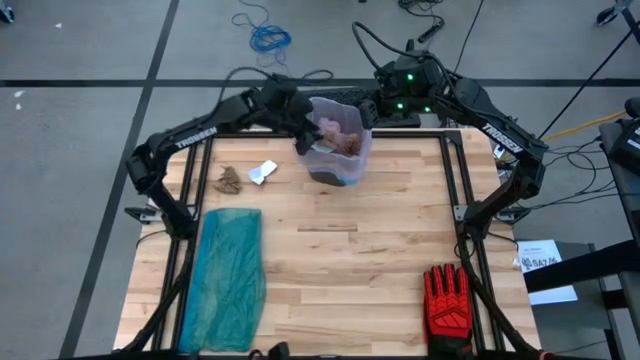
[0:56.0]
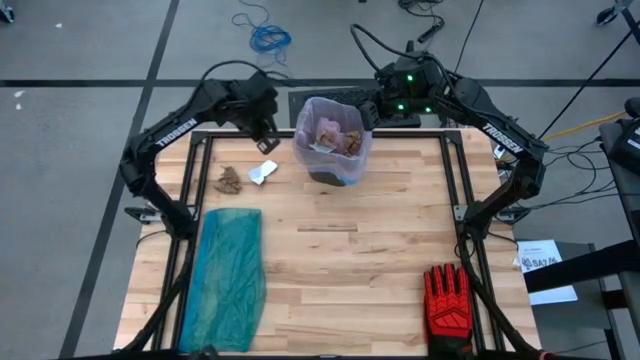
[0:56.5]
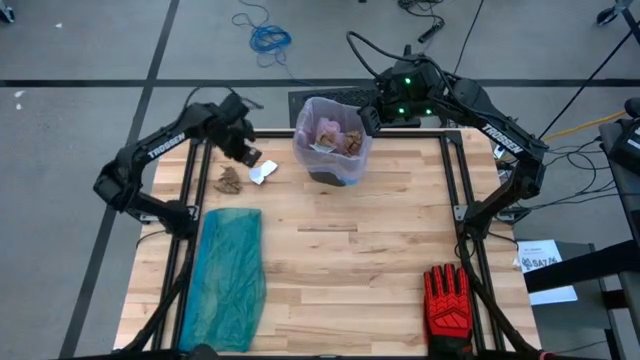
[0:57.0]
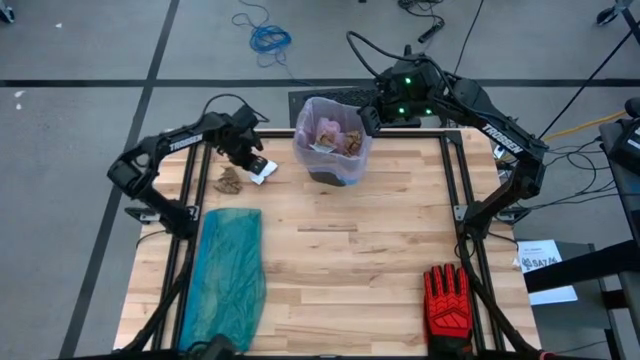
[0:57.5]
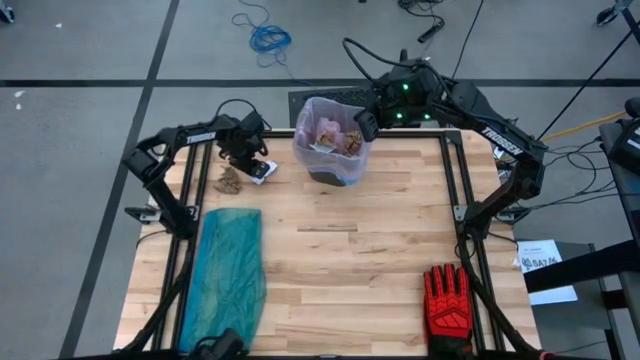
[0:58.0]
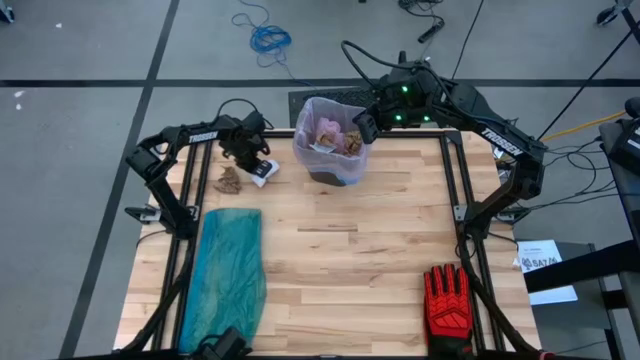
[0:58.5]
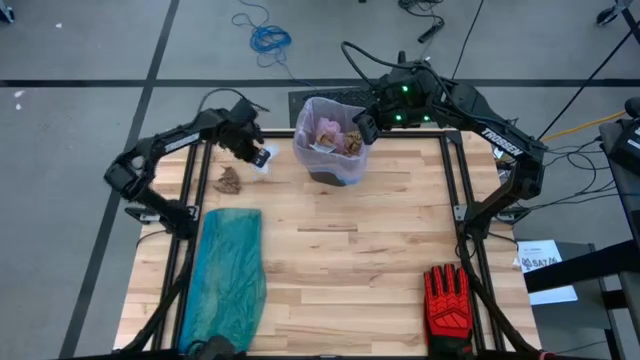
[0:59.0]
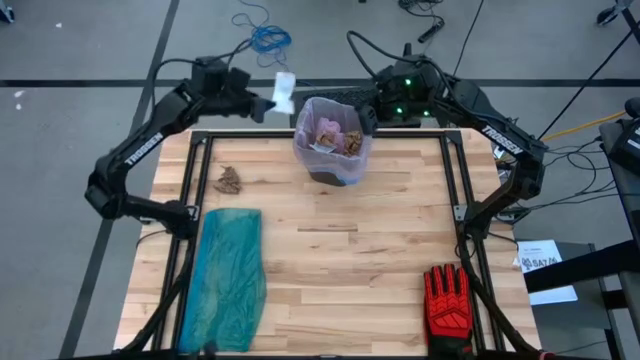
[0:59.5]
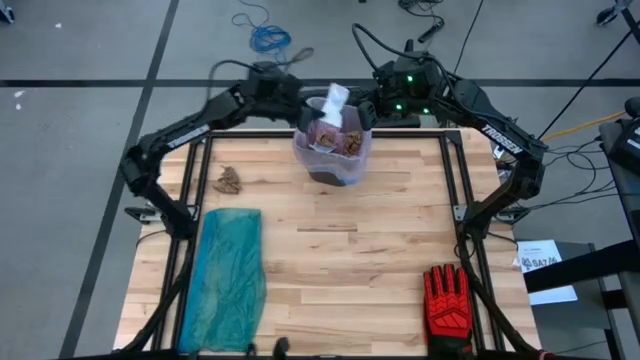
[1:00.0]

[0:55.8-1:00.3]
Task: place trash/remove bag and relplace
Put the white paper into the trash bin

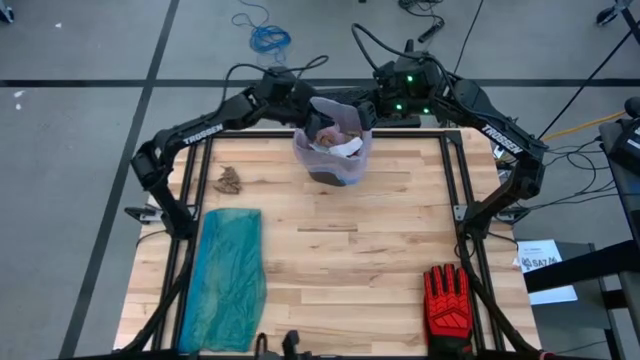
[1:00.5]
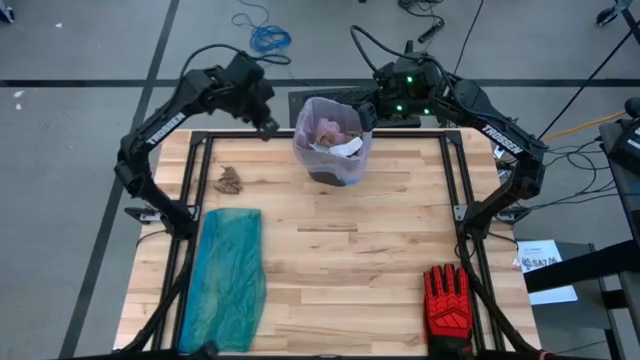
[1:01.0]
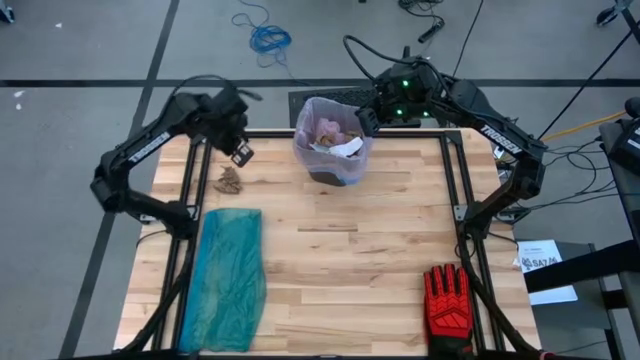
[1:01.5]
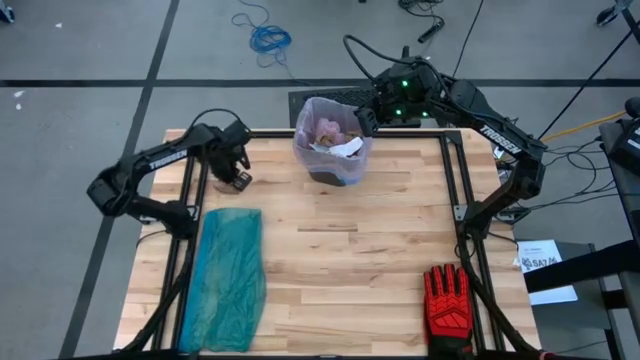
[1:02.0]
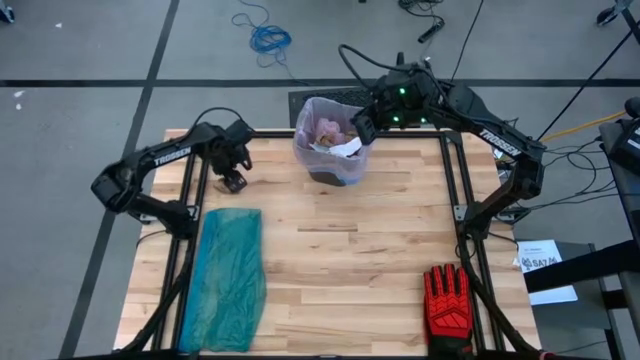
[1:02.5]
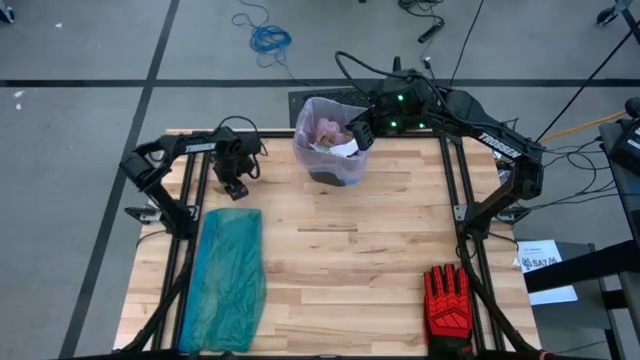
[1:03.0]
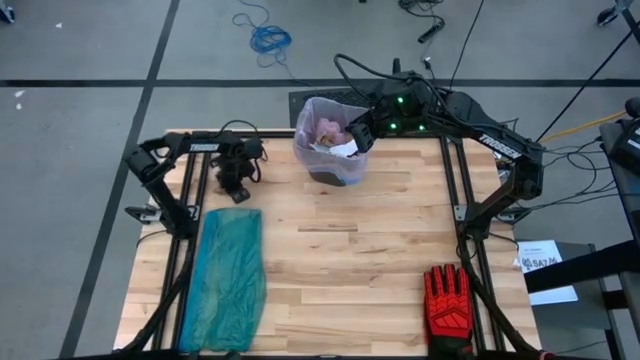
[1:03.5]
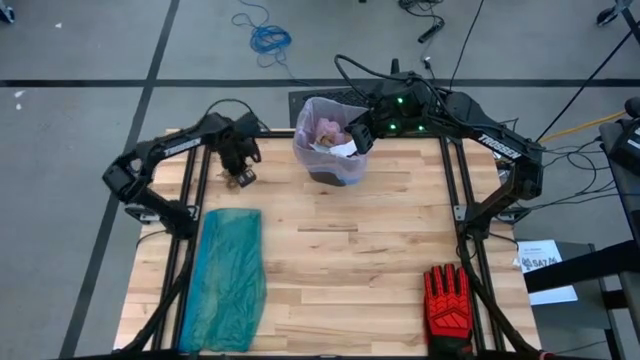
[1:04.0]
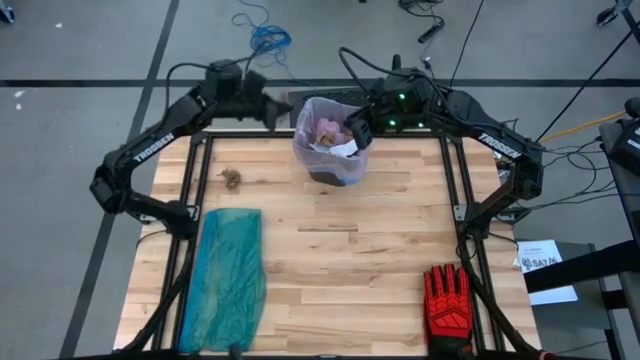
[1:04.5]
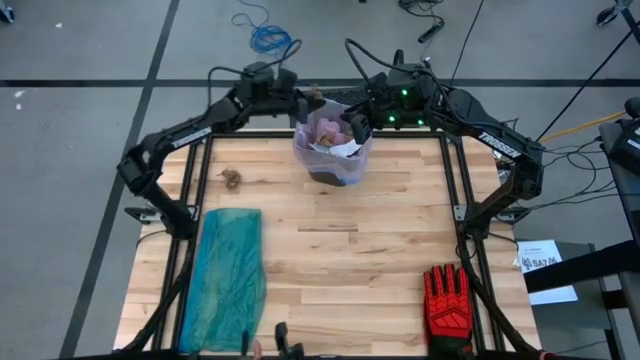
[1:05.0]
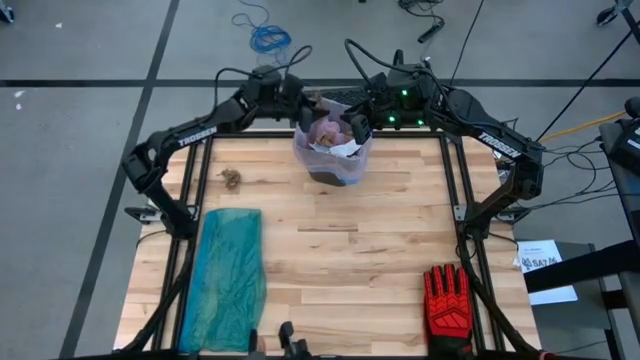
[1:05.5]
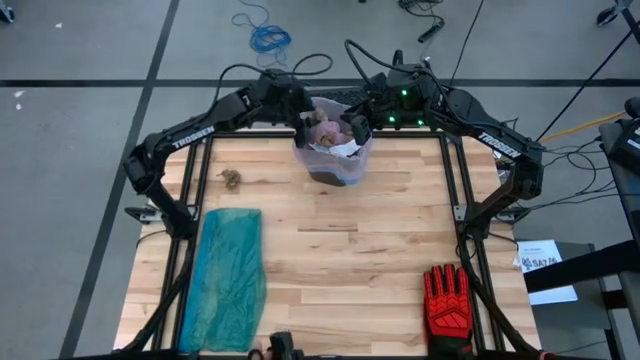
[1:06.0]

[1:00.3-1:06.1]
Put the brown napkin into the trash bin

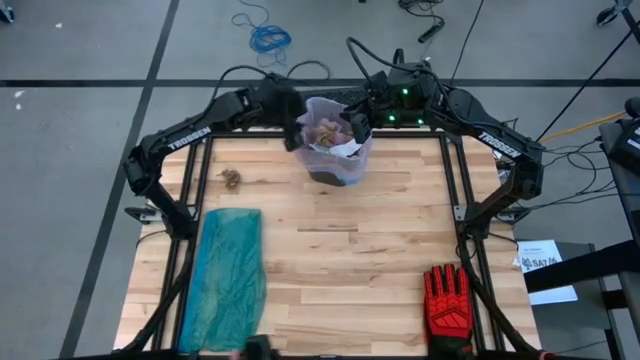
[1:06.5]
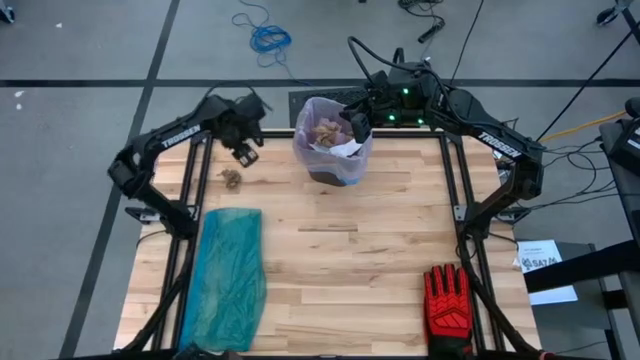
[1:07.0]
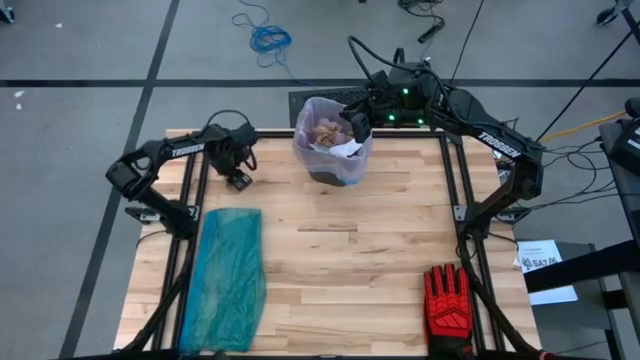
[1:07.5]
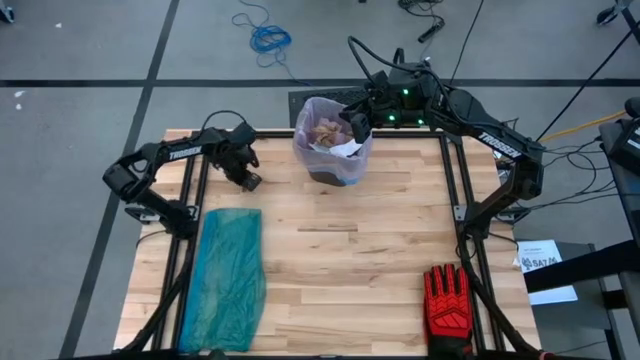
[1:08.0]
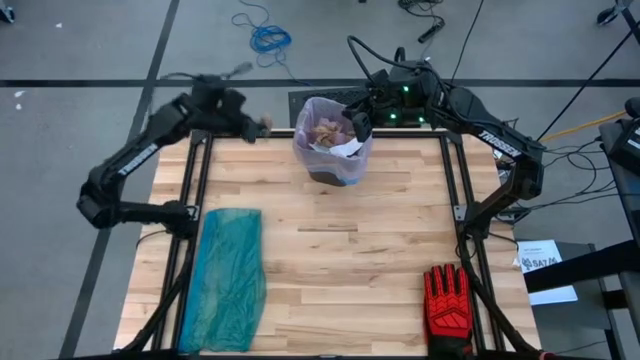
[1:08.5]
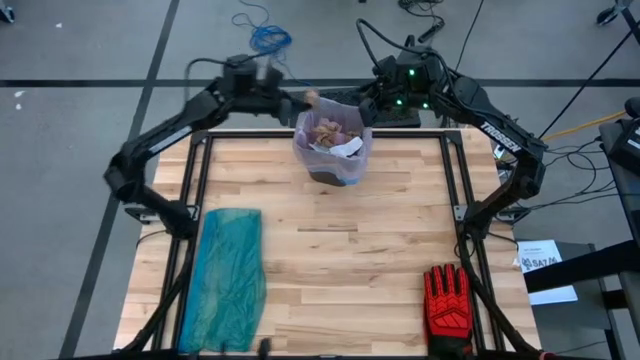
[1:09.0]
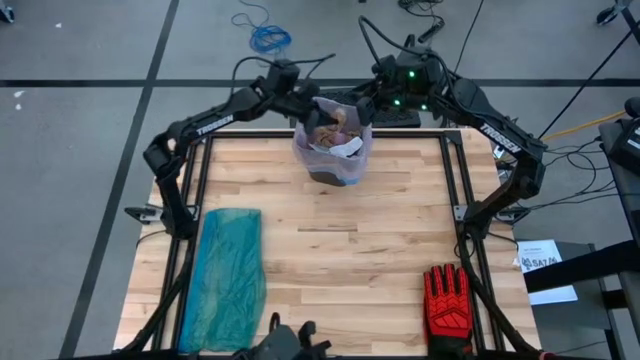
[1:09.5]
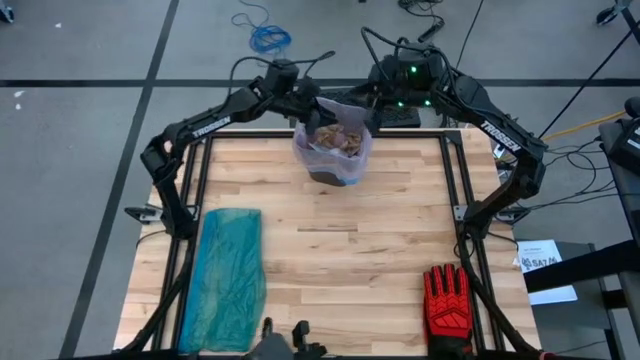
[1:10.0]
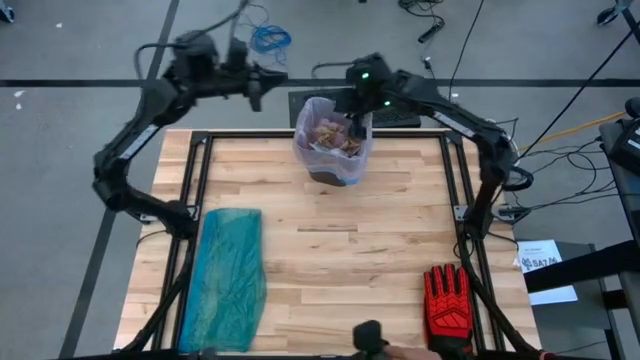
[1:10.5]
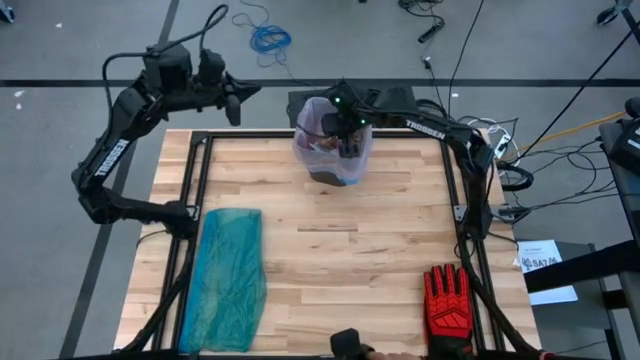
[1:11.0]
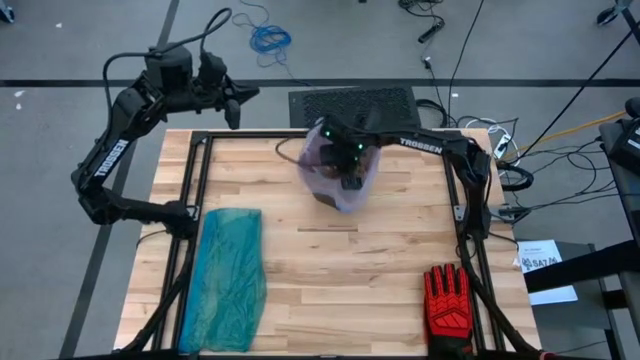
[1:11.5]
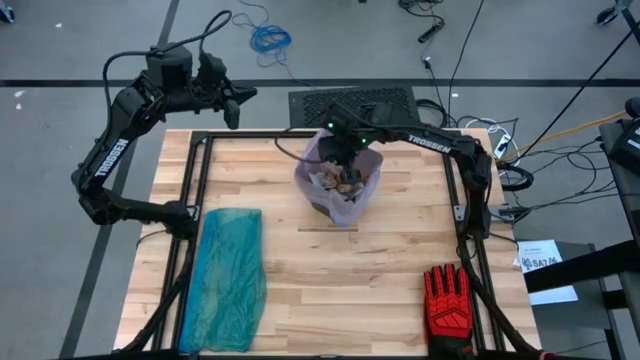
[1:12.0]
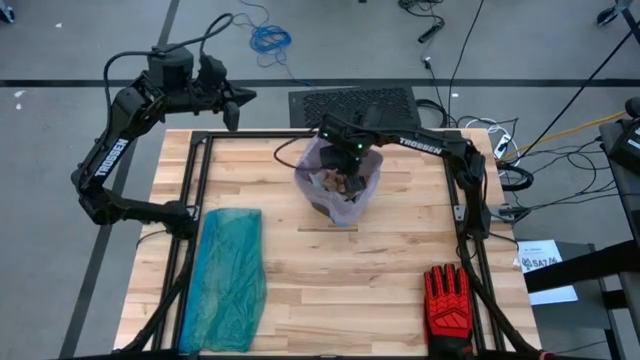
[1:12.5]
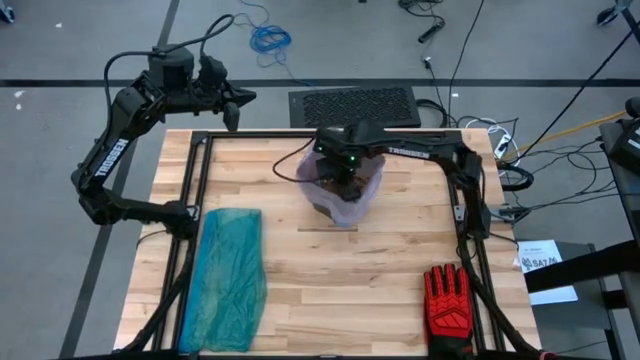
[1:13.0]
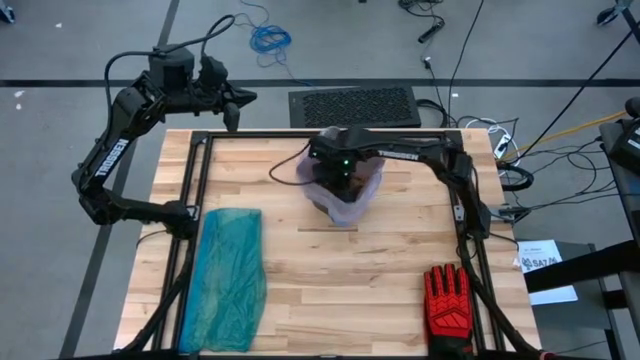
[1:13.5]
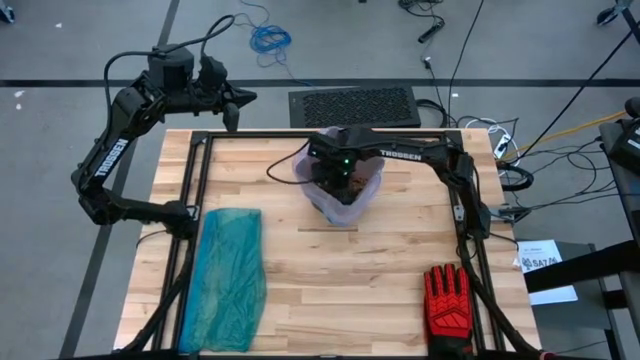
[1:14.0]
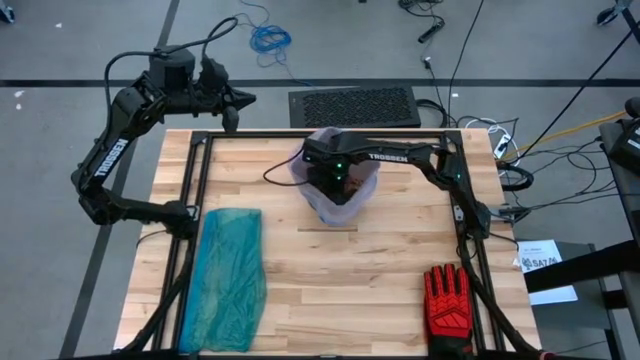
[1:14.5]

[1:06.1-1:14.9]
Put the brown napkin into the trash bin

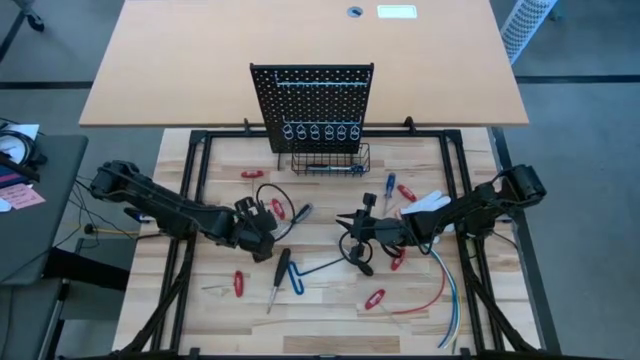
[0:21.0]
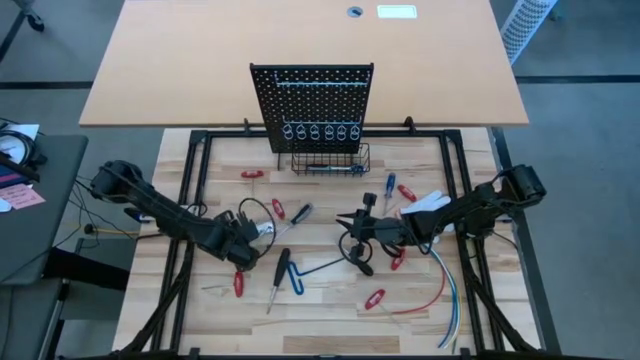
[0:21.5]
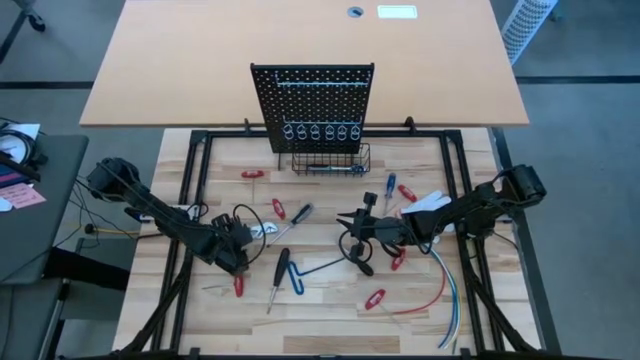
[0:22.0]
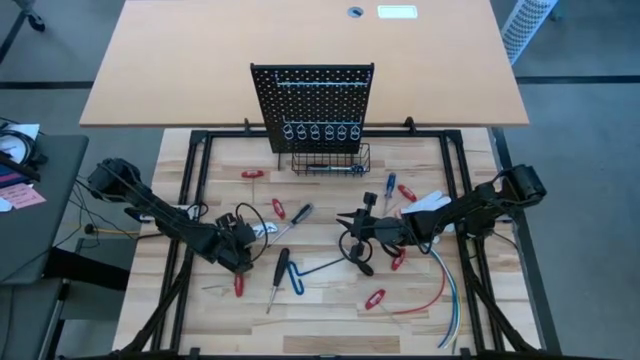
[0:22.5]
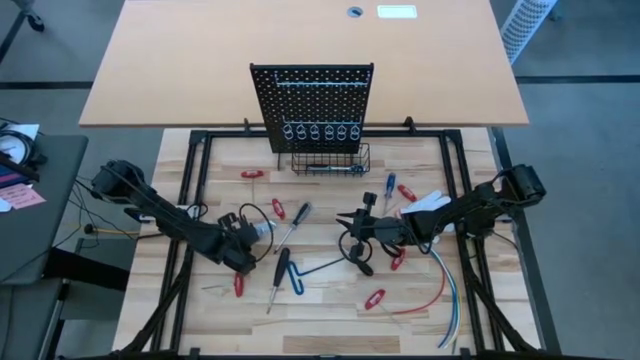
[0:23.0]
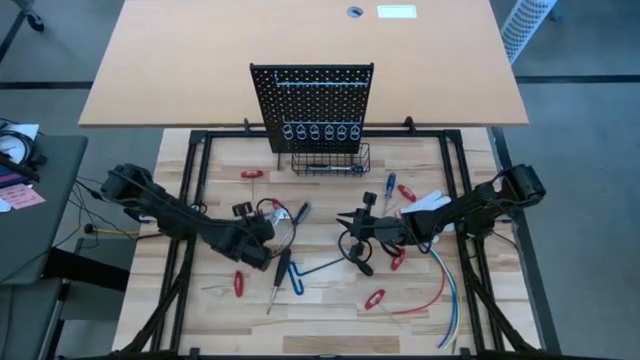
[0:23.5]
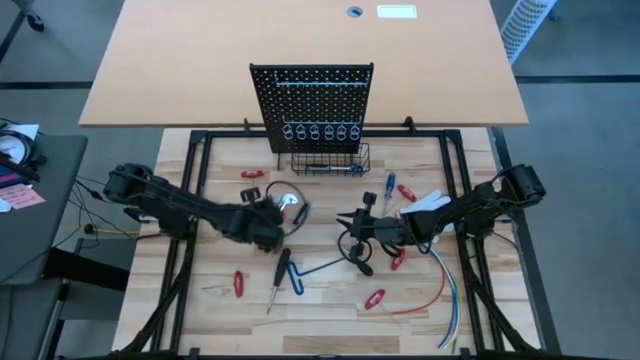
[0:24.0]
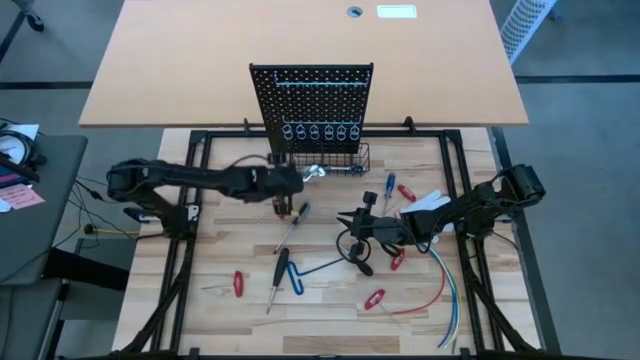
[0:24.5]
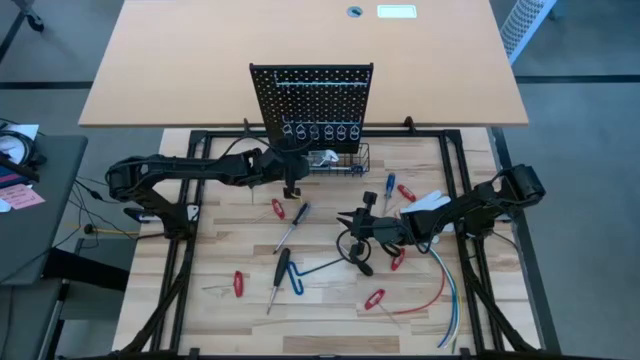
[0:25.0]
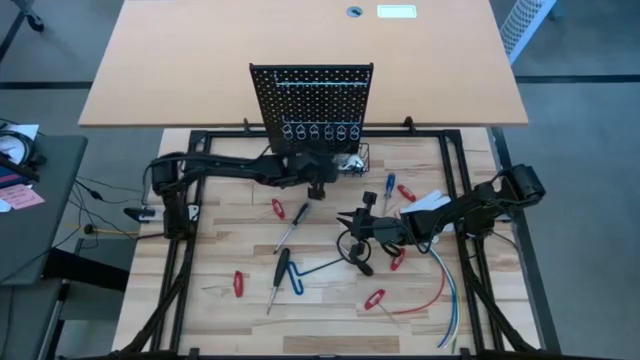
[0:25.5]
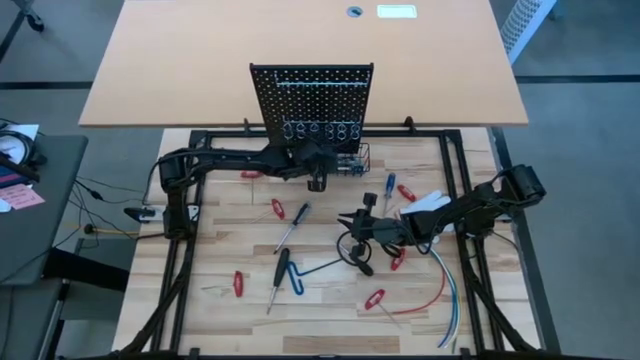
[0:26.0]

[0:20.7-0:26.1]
Task: Hang tools onto peg board
Put the slip-joint pliers into the wire basket on the pegboard
